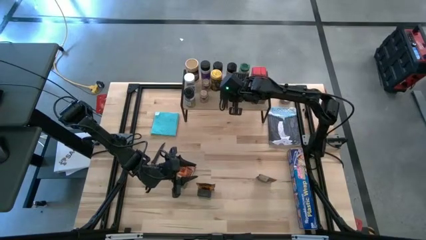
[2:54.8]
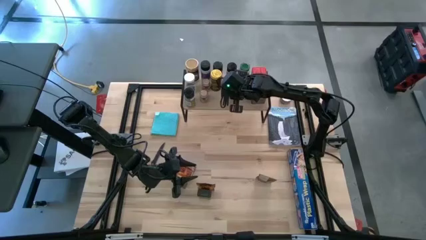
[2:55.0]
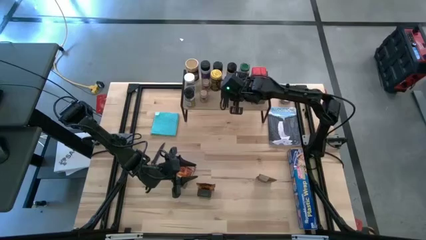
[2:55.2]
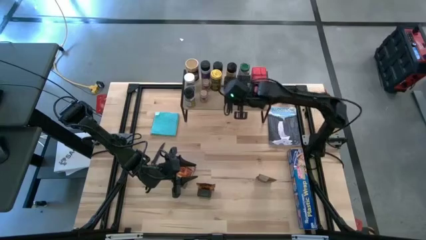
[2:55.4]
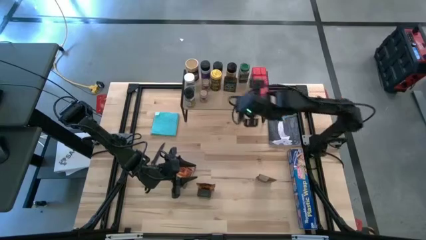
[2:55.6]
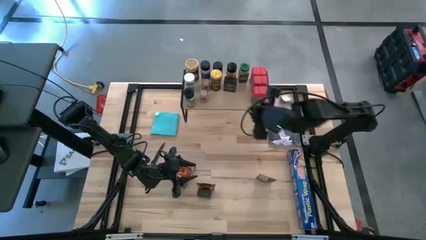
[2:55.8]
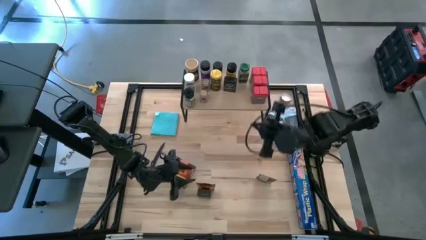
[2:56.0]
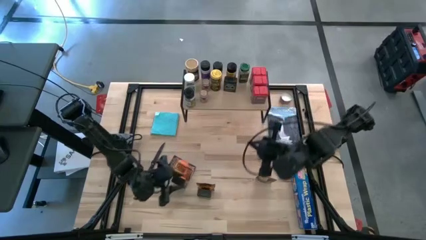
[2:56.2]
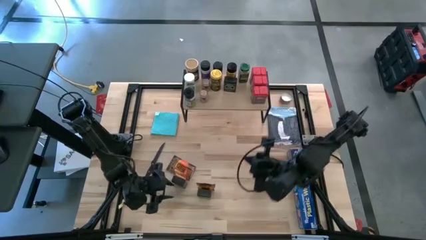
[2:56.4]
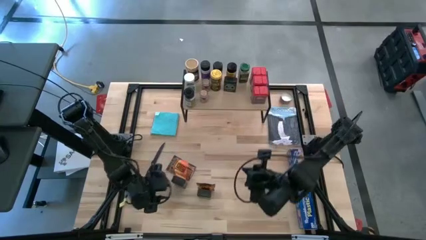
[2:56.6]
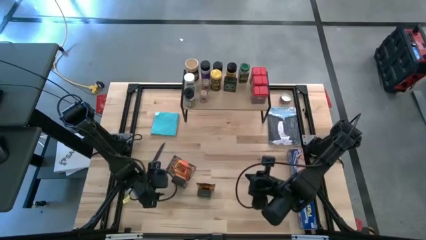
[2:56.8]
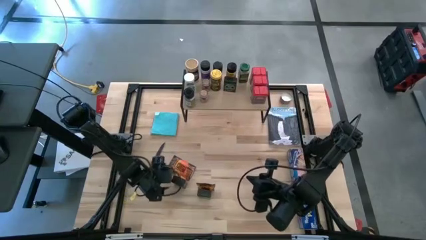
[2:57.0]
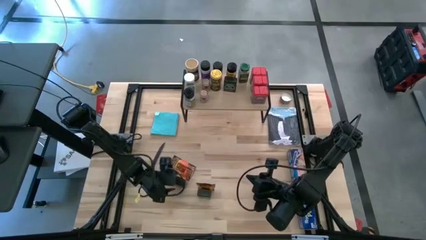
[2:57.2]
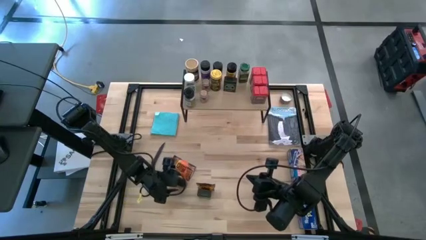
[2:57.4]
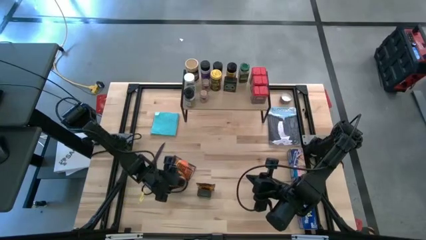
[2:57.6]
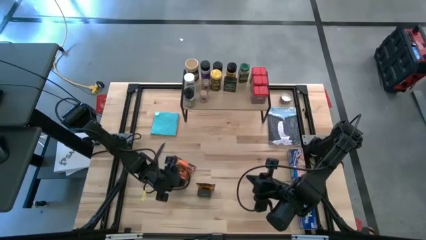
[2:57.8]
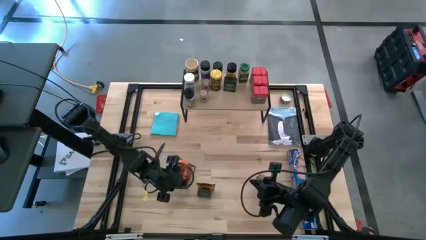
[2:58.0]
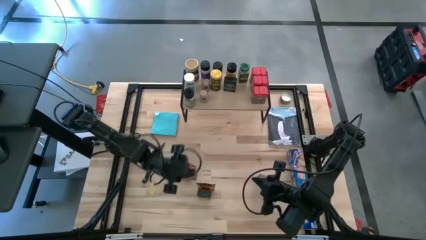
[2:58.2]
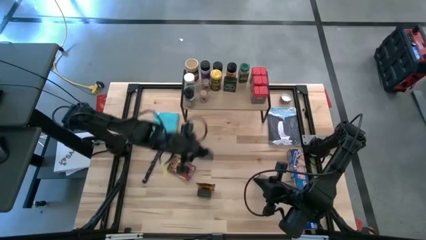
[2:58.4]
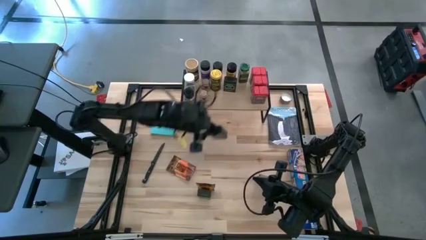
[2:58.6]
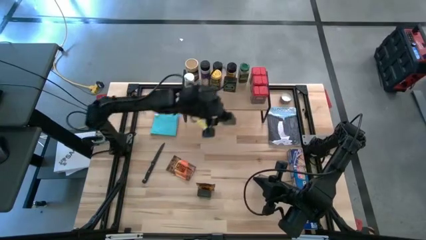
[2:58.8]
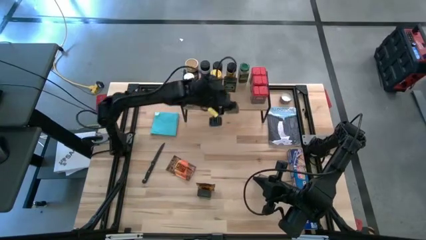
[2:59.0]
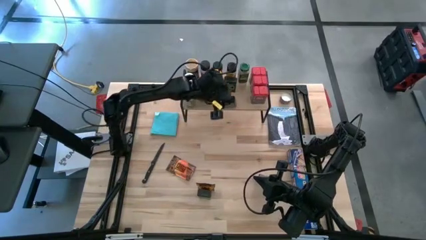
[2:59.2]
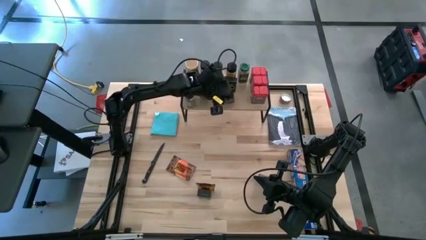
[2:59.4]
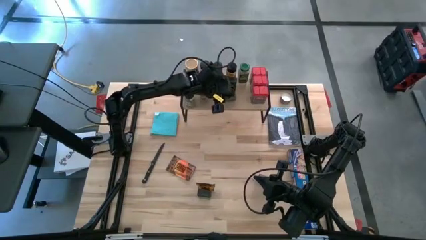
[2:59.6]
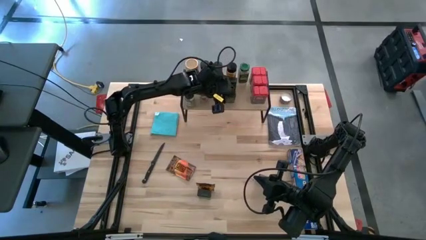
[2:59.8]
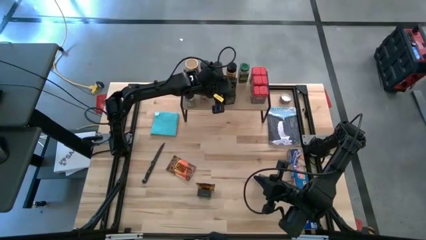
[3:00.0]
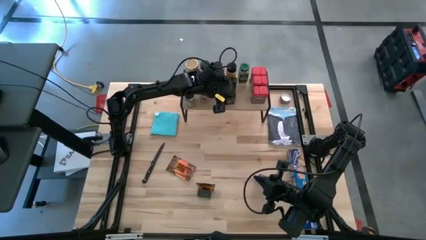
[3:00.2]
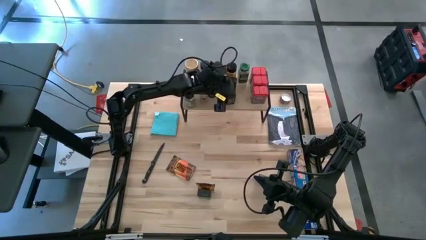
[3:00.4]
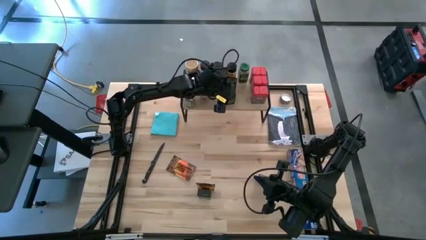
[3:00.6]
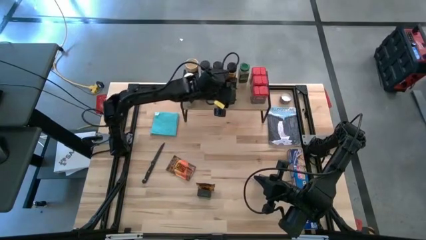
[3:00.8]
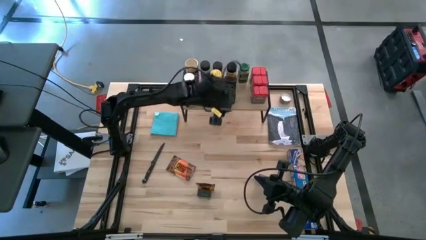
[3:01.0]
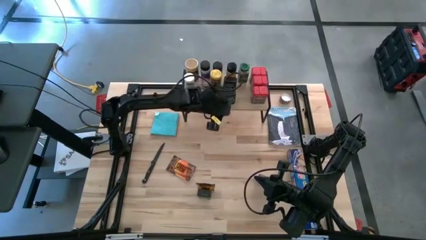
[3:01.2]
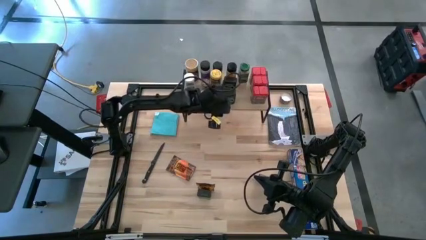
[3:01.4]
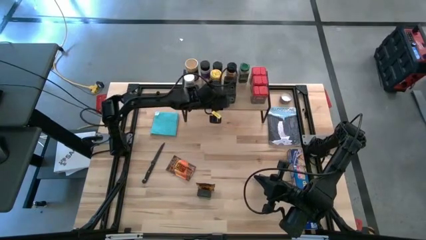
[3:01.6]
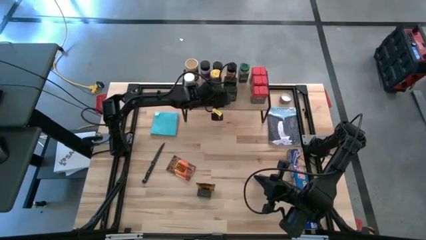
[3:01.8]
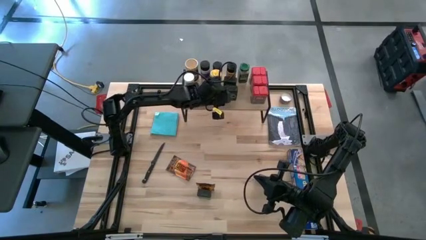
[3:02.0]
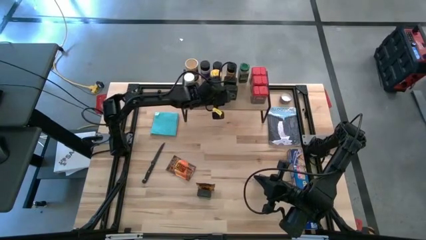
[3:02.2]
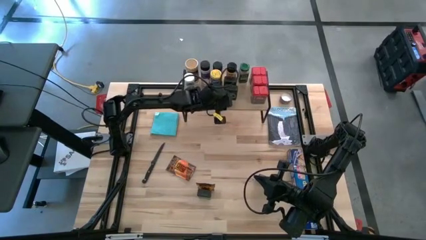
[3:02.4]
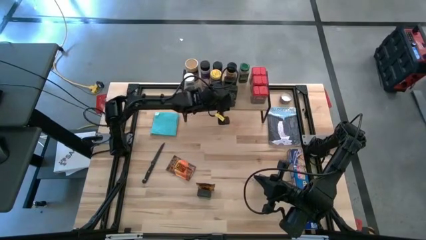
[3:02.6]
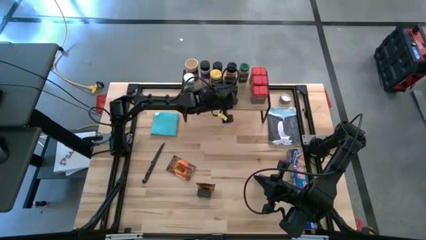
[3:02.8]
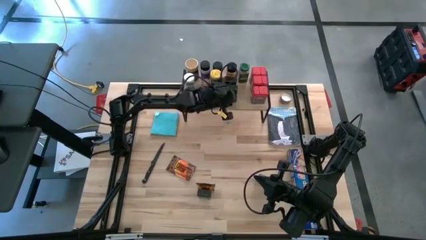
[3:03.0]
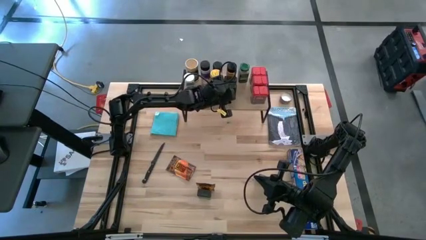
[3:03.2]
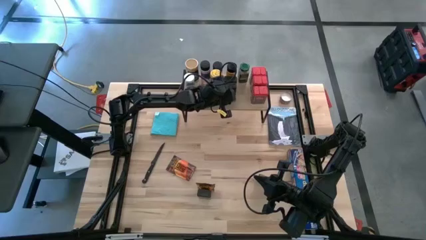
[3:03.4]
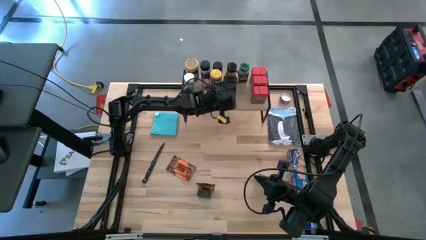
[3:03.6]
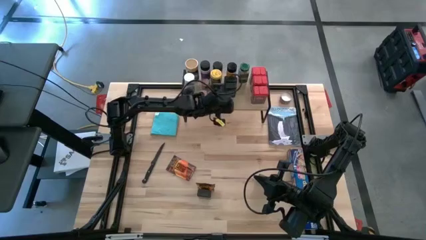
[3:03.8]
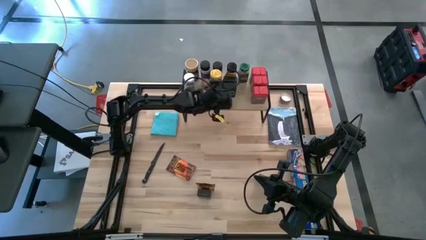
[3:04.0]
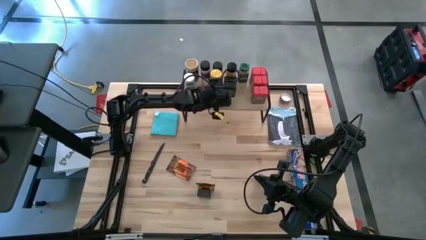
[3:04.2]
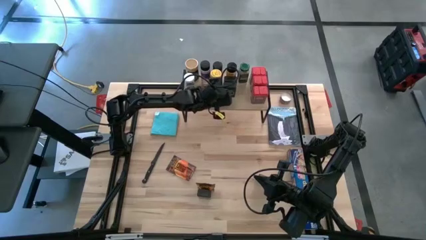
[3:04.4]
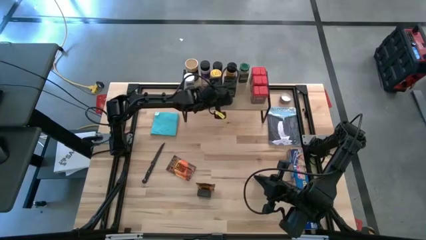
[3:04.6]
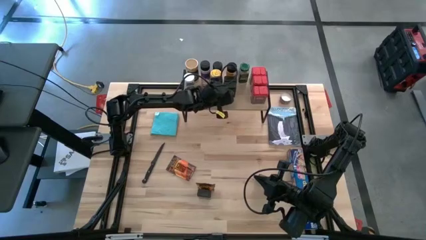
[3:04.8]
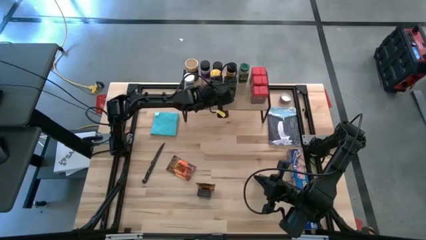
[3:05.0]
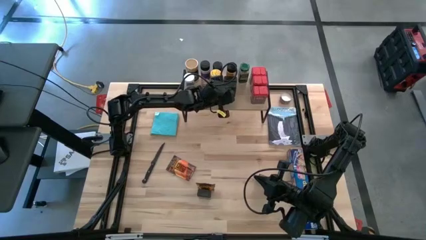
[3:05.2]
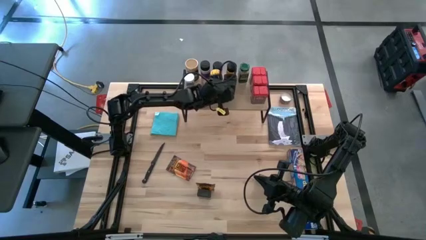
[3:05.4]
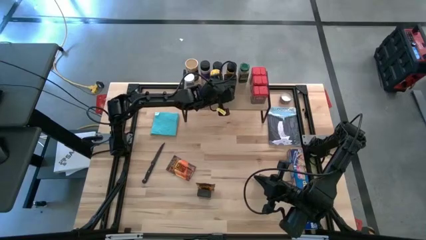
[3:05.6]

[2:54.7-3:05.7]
Task: Shelf spices
Put the black seasoning can on the shelf aligned with the other black seasoning can

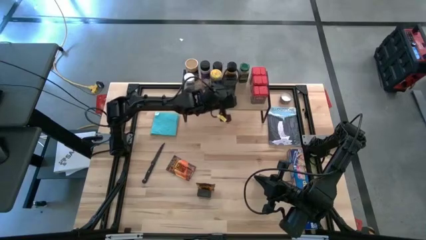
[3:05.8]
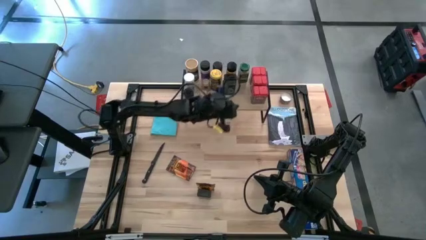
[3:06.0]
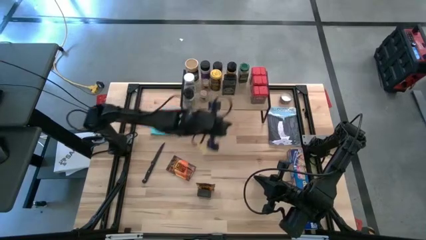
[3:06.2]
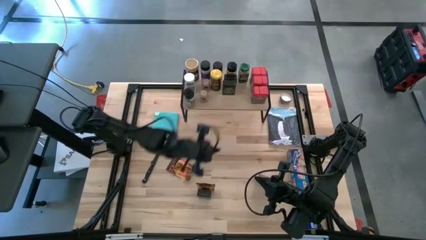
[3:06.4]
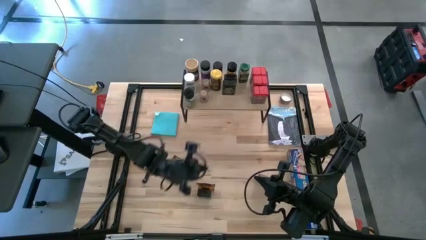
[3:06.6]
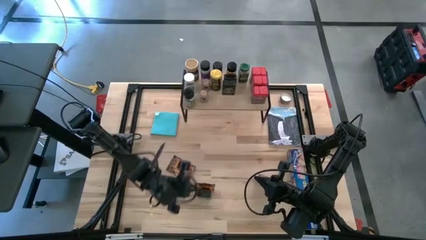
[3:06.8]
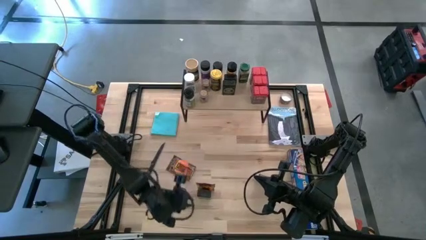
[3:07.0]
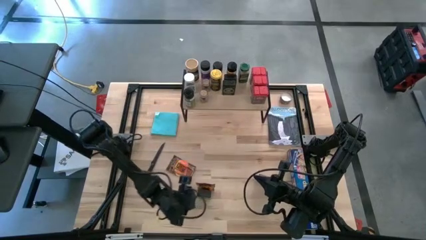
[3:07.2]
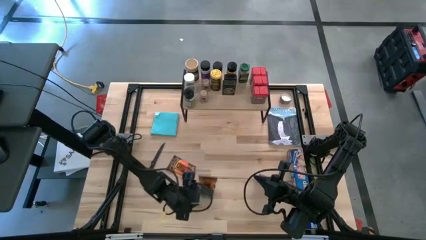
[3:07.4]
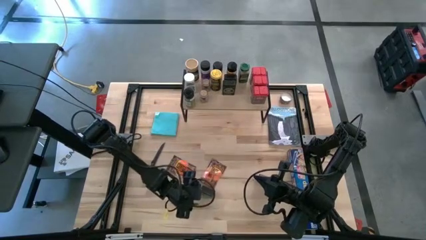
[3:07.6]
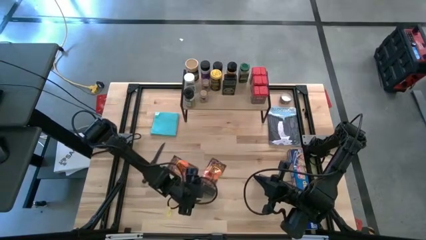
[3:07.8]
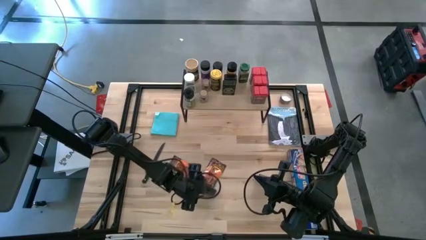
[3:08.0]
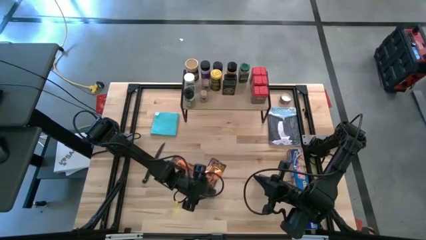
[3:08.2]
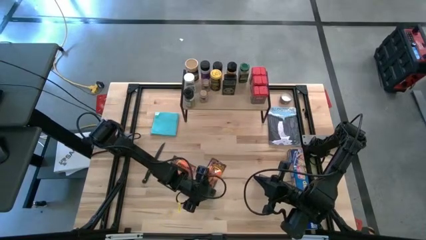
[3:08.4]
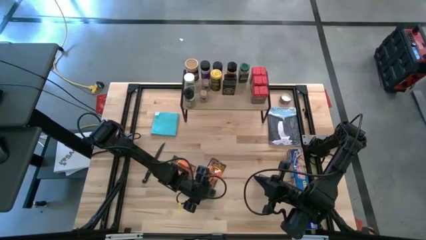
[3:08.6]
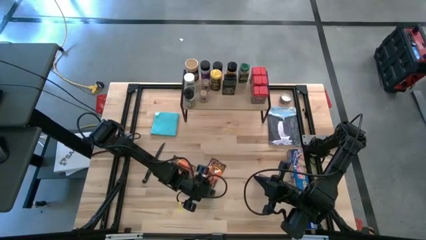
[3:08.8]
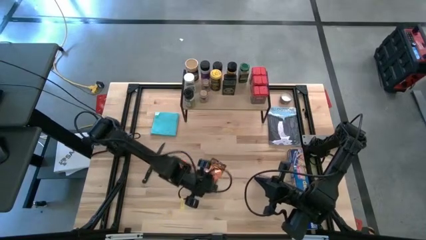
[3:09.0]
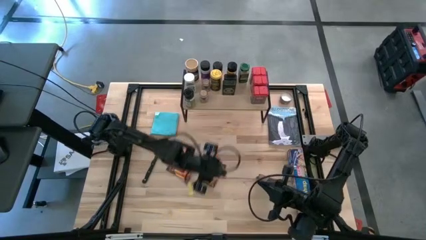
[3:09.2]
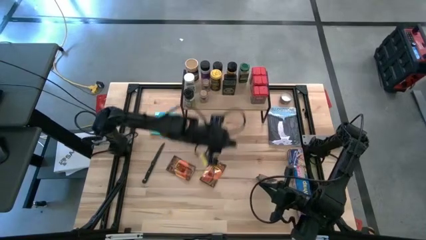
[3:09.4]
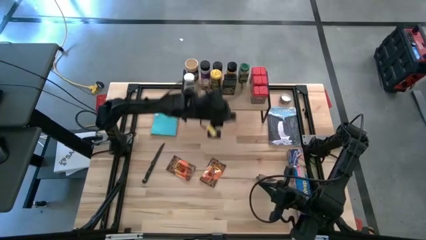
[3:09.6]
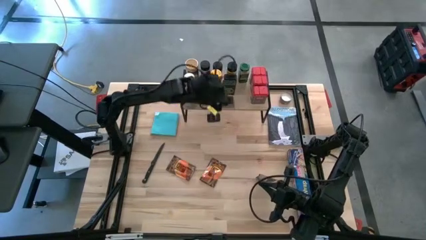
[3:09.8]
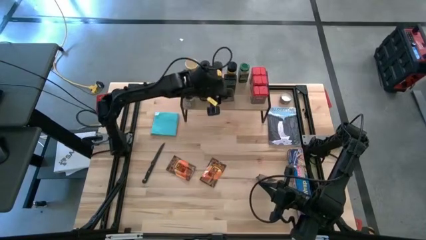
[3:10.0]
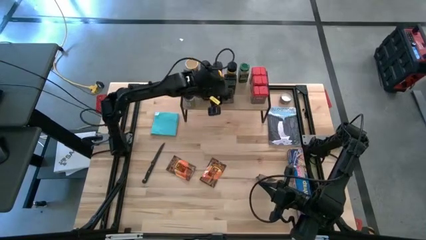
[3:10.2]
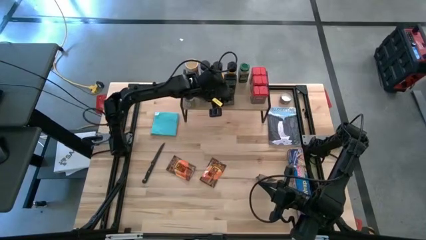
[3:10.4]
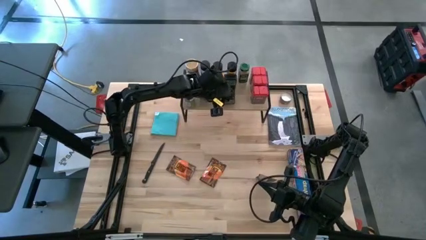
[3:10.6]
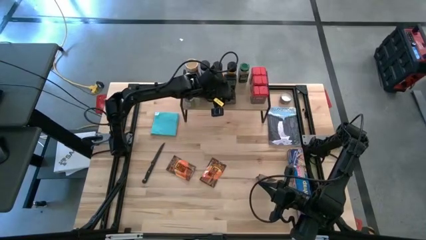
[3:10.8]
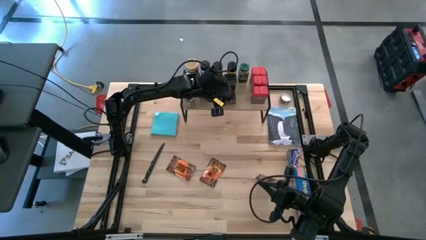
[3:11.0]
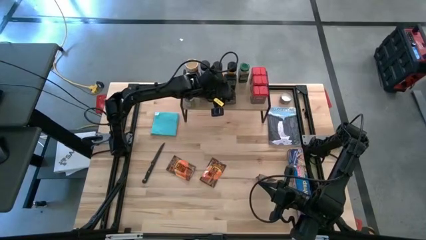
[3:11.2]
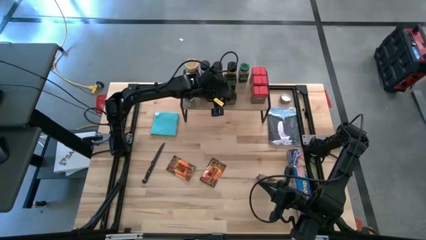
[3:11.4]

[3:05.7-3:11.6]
Put the black seasoning can on the shelf aligned with the other black seasoning cans
